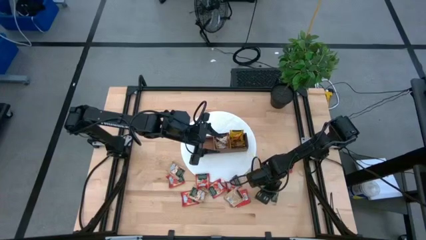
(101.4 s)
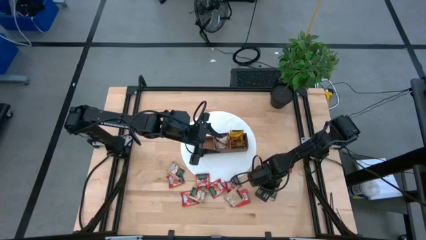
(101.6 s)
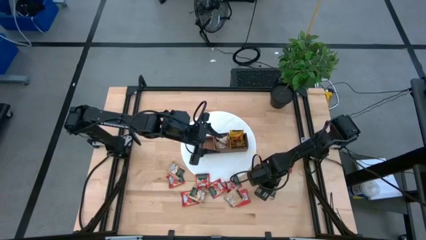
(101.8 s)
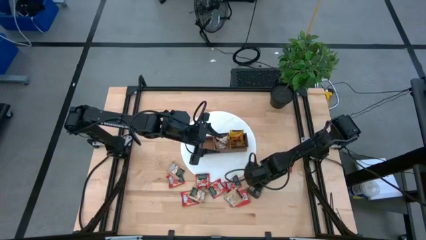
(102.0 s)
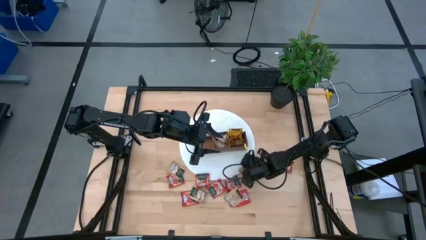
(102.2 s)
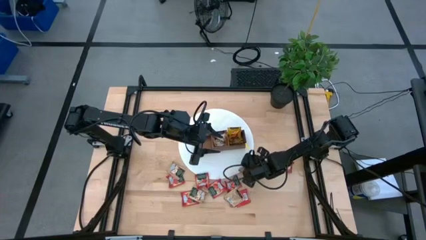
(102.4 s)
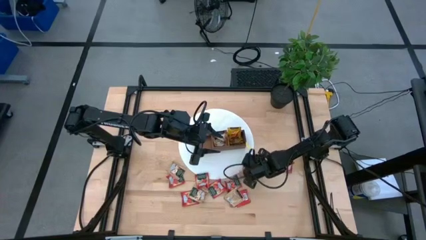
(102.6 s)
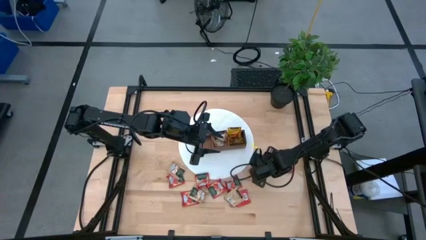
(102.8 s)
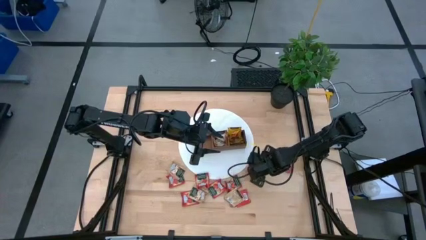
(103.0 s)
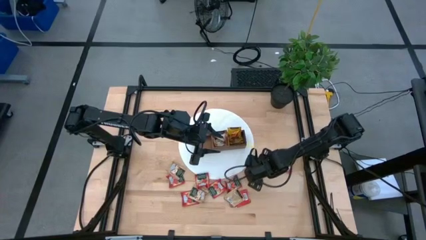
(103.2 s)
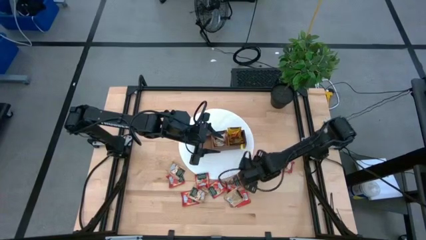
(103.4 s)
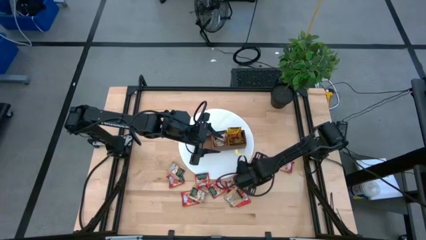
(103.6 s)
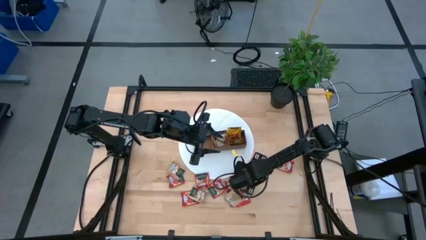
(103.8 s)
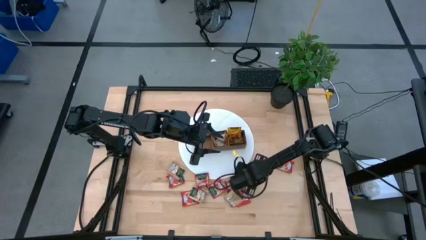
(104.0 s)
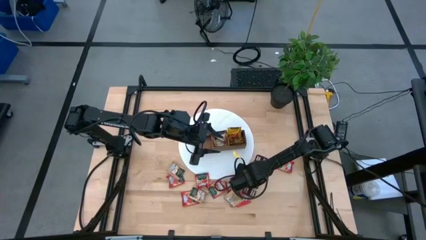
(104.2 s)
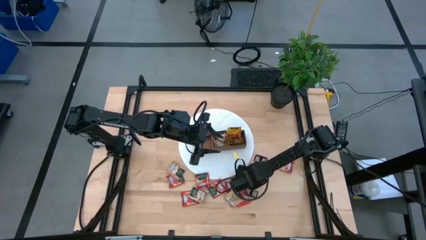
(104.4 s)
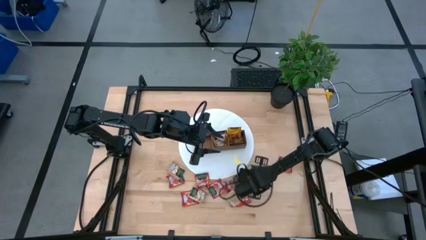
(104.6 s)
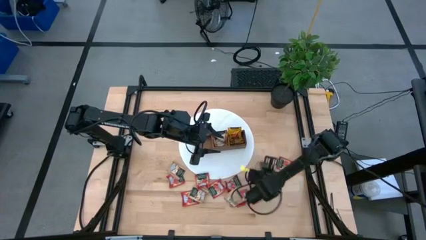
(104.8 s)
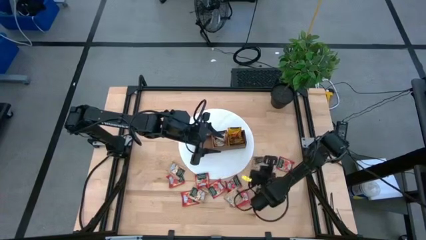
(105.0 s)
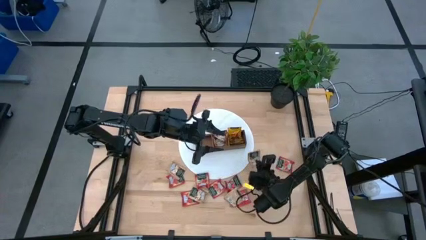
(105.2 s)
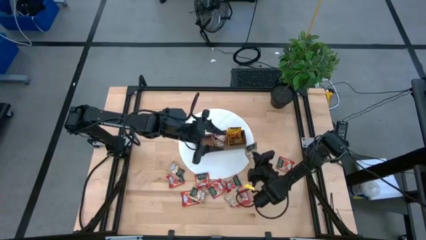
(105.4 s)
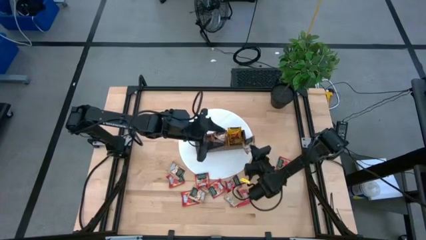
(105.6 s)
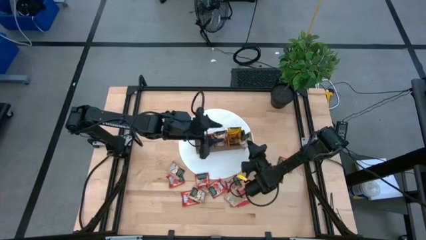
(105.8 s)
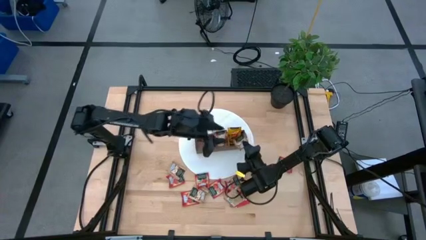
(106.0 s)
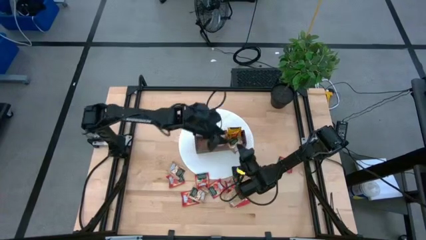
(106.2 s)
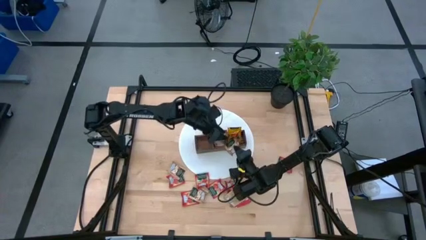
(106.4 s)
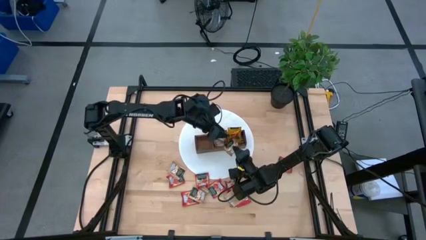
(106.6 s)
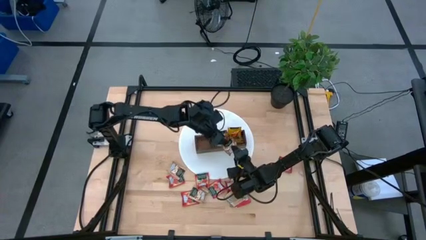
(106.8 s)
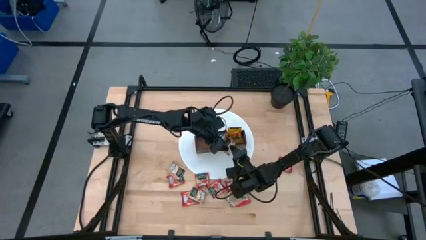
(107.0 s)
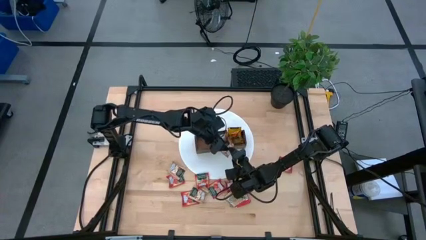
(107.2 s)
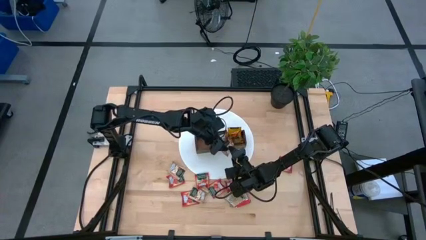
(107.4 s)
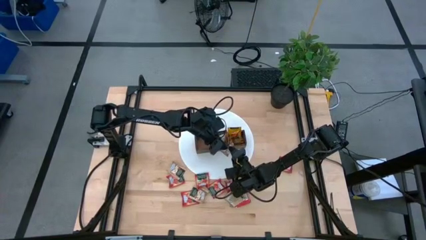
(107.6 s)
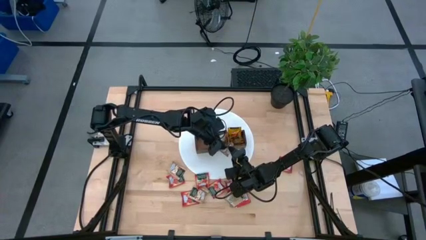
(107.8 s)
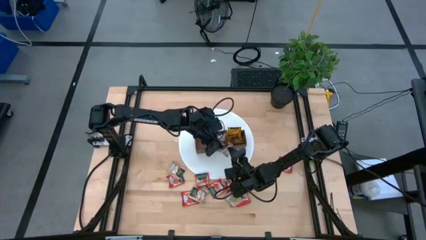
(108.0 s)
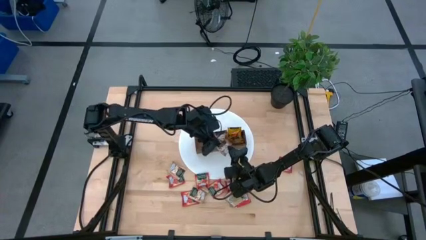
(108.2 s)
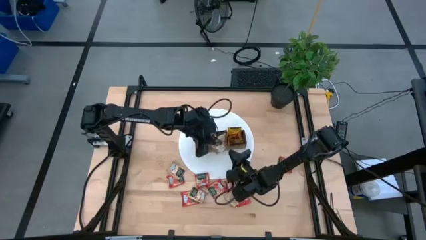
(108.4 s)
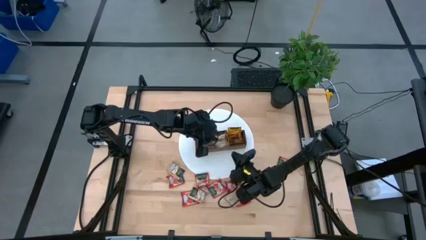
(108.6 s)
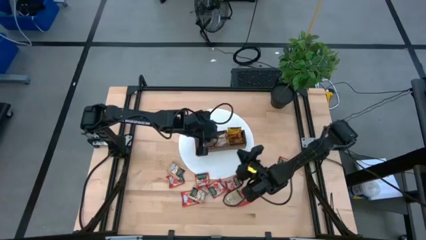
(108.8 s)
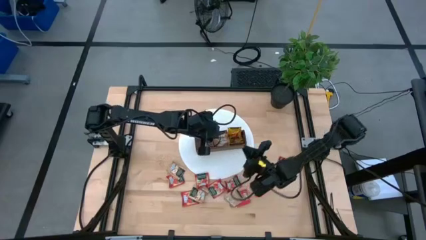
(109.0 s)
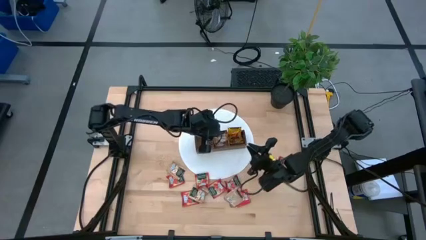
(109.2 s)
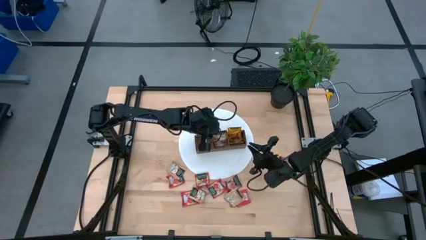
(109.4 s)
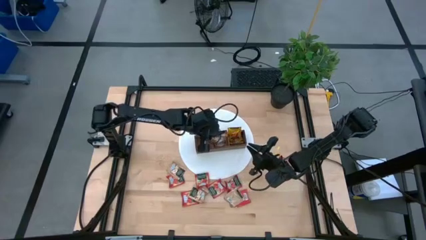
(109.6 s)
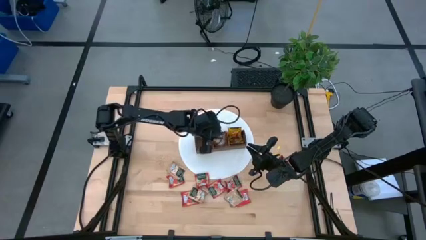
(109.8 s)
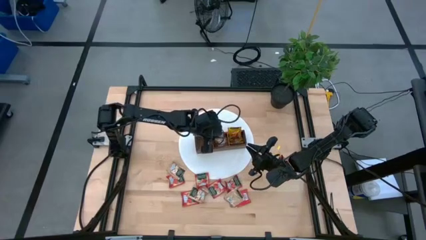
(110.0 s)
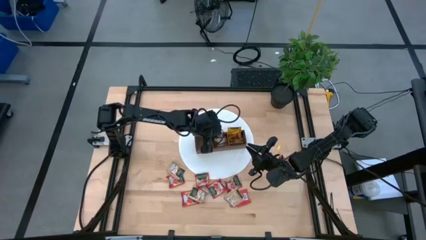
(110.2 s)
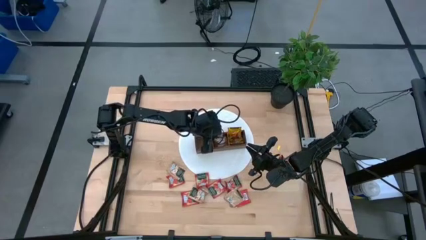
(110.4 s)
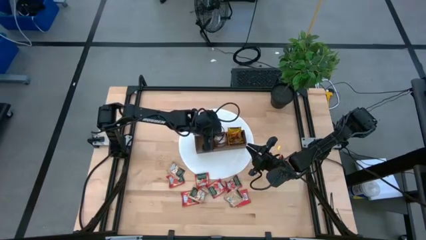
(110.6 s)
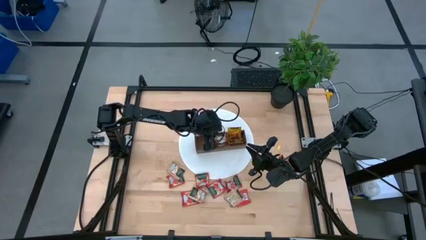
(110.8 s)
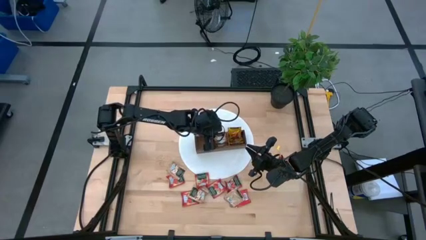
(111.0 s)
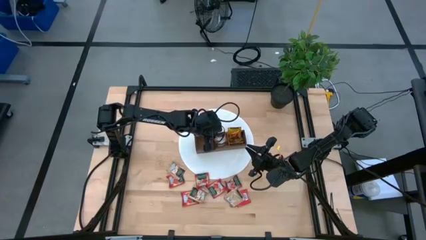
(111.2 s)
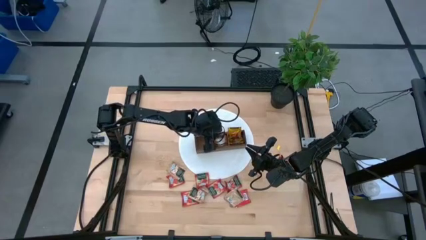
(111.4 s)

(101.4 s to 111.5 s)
Task: Pick & Place Tea
Put the brown tea bag into the middle section of the wooden organizer

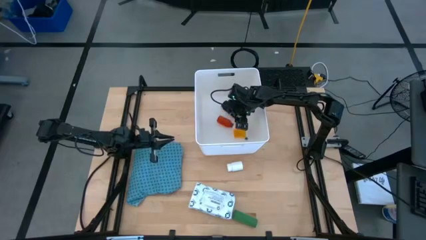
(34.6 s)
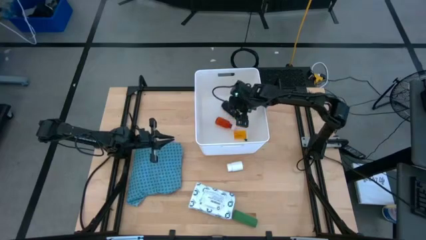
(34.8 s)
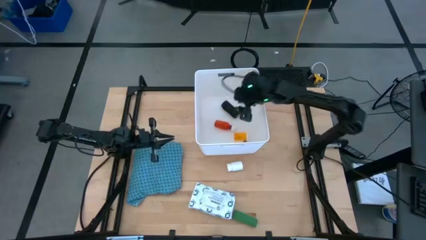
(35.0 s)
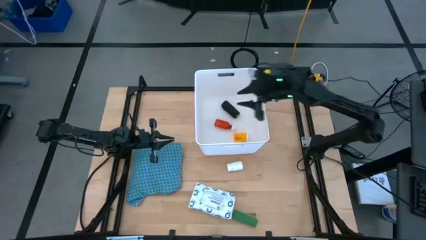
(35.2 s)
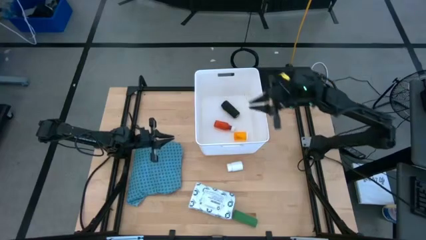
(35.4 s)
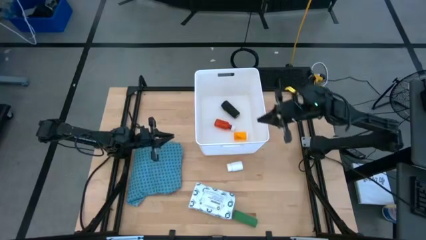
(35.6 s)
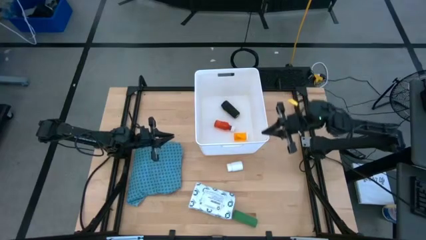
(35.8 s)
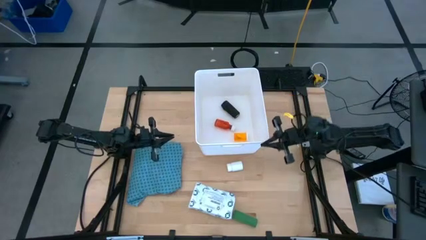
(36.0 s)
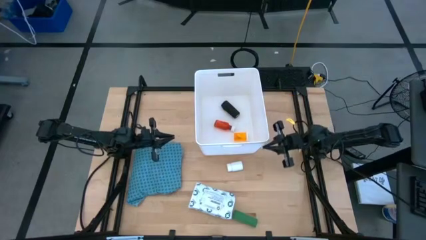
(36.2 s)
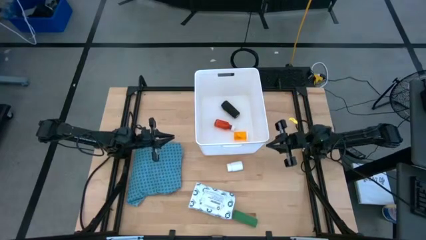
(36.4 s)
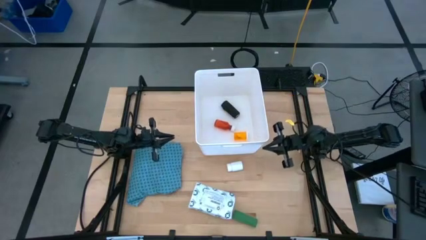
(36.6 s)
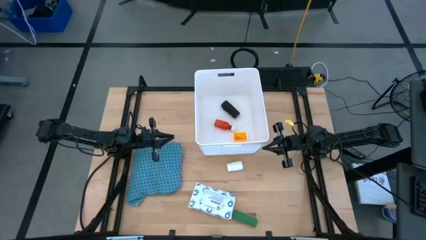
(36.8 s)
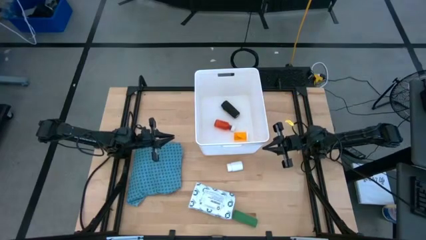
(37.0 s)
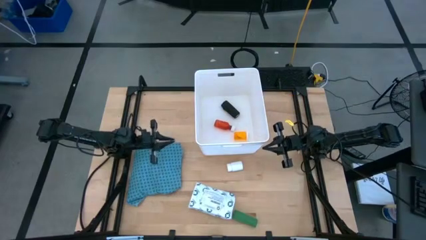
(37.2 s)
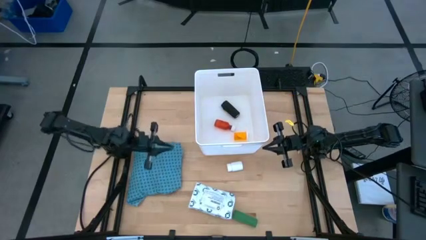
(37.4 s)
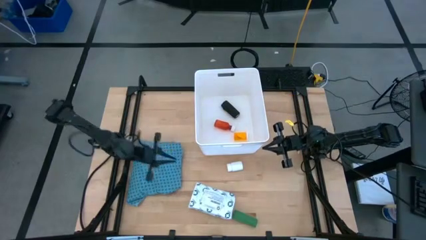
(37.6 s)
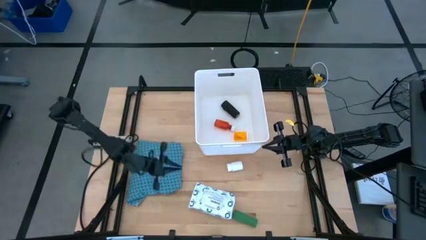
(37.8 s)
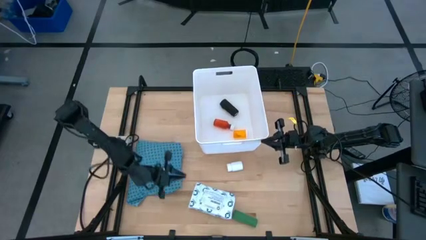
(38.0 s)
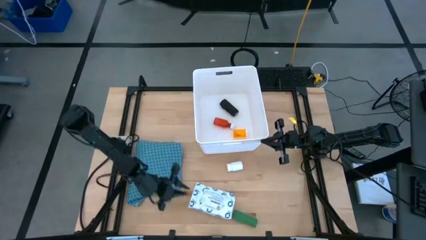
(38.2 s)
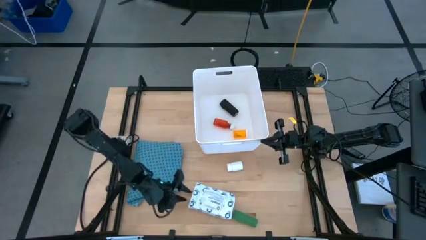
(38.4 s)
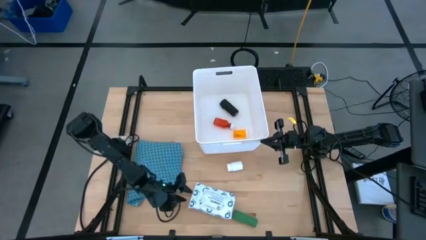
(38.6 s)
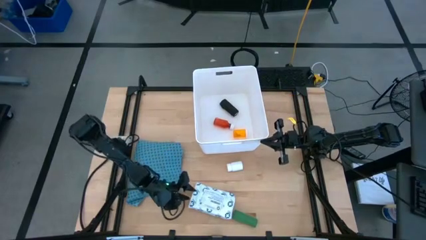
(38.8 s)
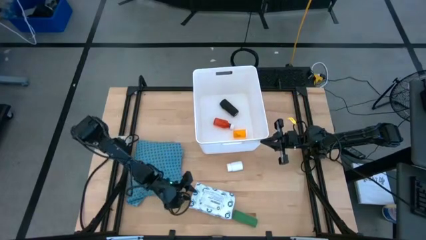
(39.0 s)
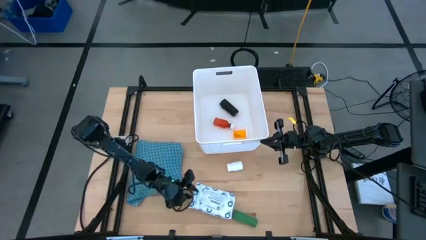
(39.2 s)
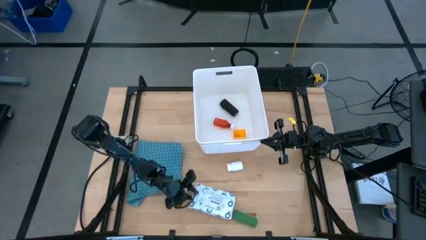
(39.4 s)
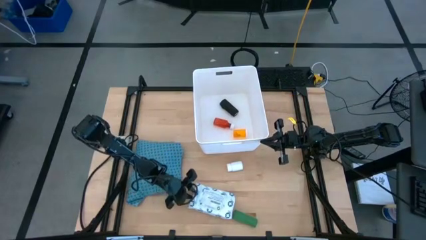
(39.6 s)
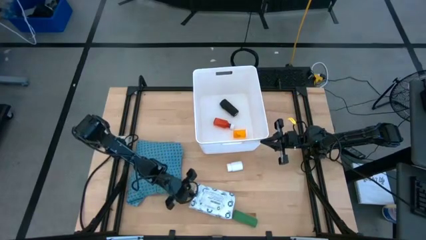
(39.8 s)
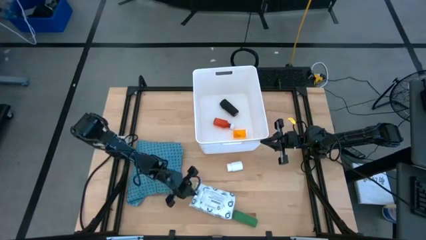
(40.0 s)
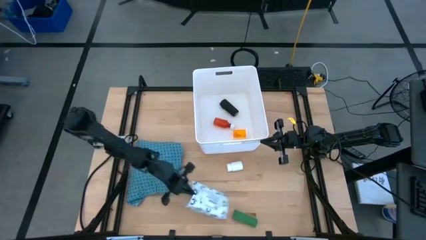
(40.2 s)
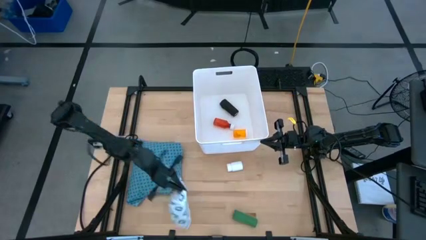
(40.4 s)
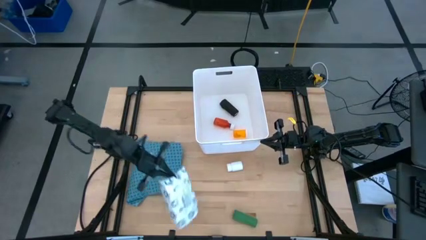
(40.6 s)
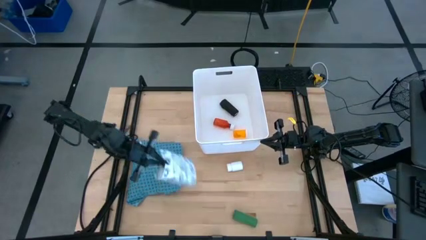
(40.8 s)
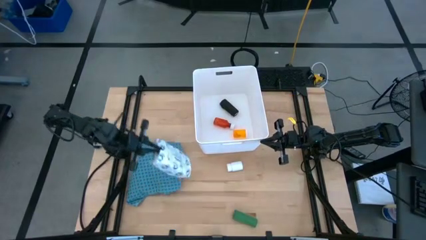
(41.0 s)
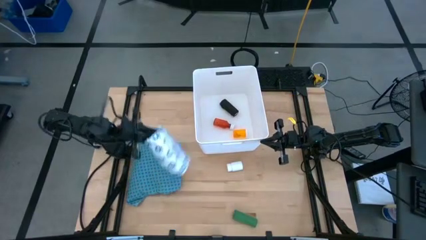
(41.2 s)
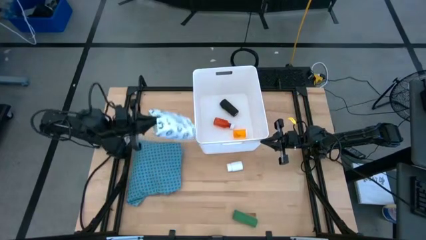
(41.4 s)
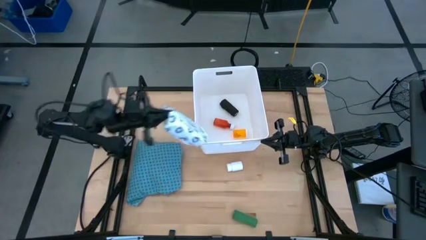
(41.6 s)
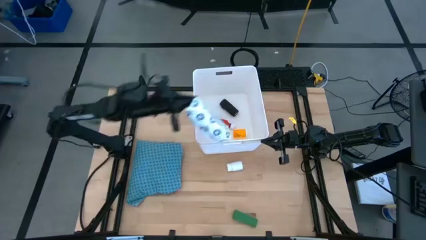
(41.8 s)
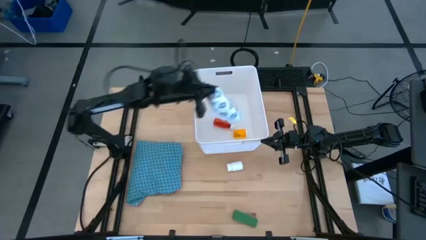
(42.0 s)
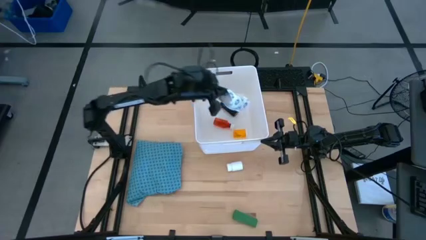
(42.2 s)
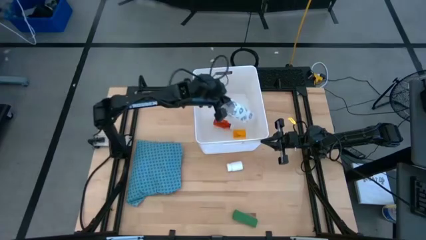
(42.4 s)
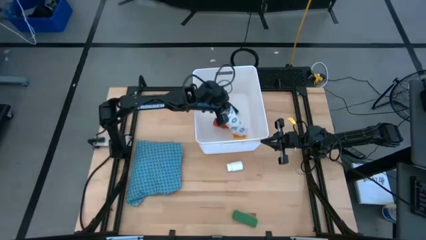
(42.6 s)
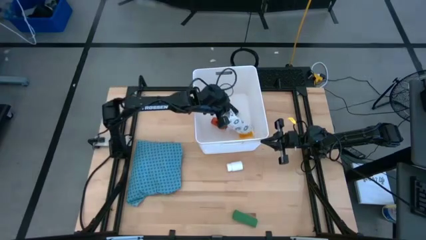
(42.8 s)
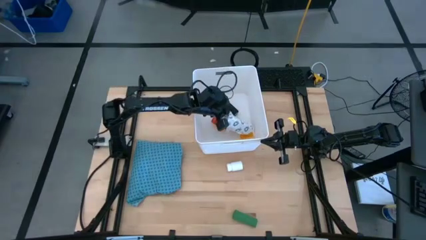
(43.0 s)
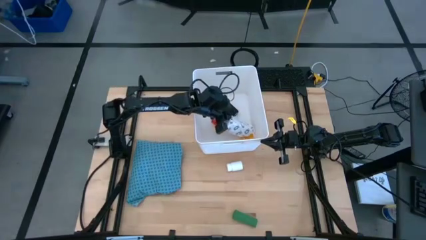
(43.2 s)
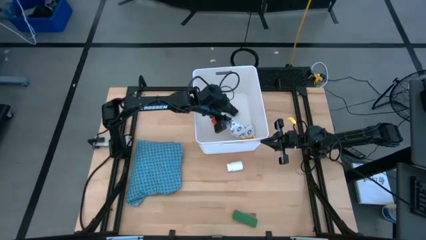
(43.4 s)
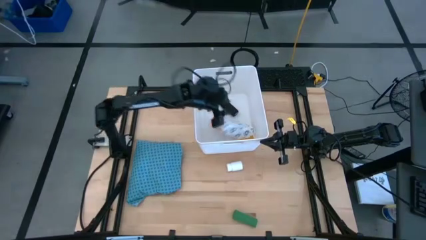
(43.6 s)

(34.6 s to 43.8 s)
Task: Pick & place medical supplies in basket/bin
Put the white package in the white basket
